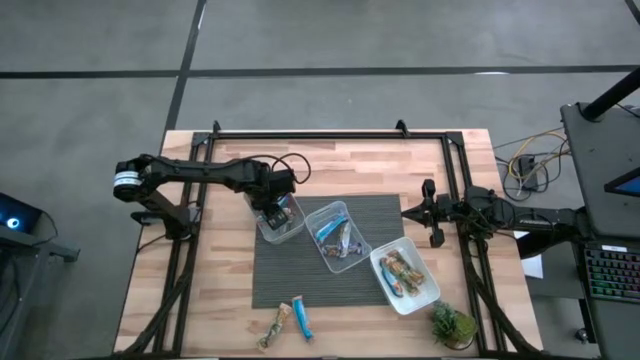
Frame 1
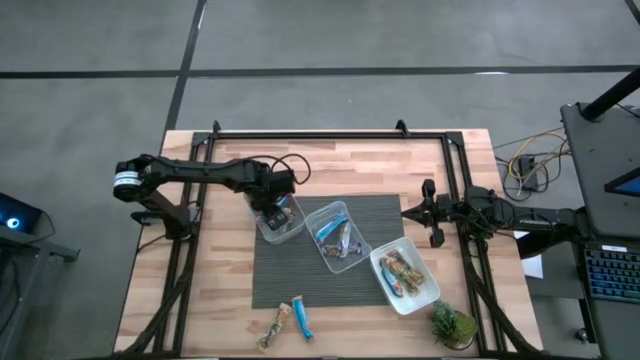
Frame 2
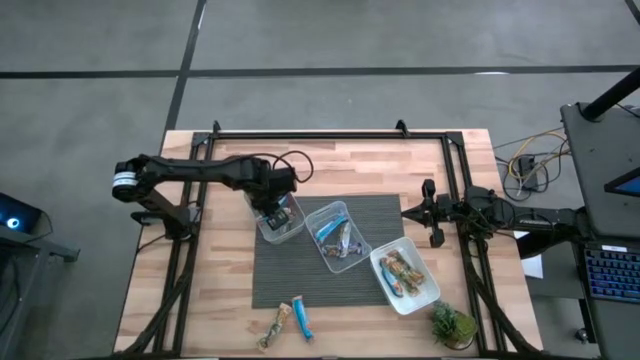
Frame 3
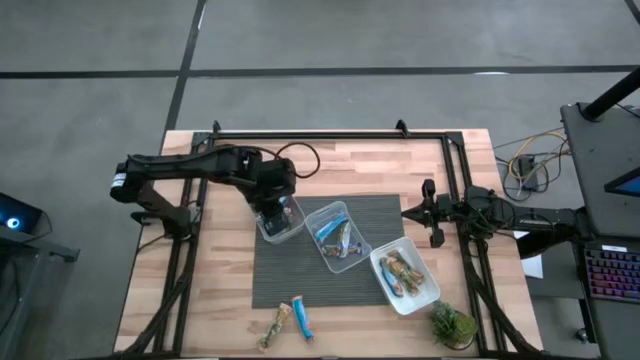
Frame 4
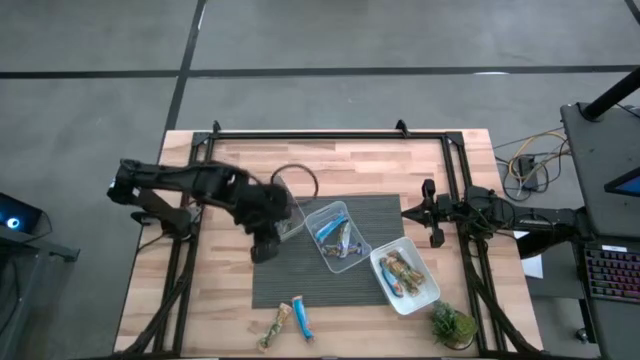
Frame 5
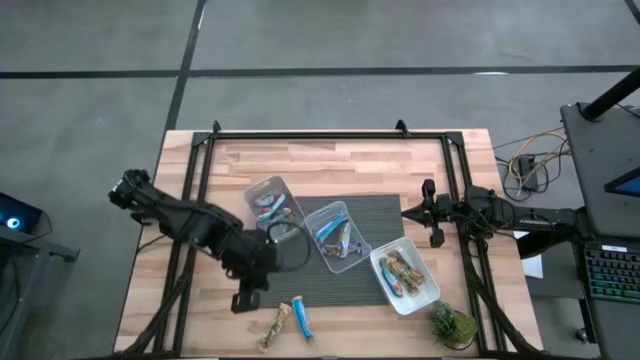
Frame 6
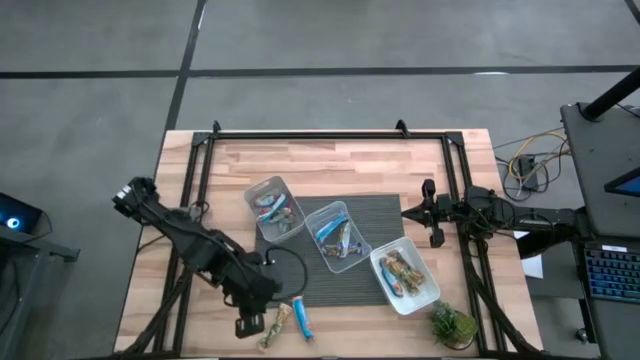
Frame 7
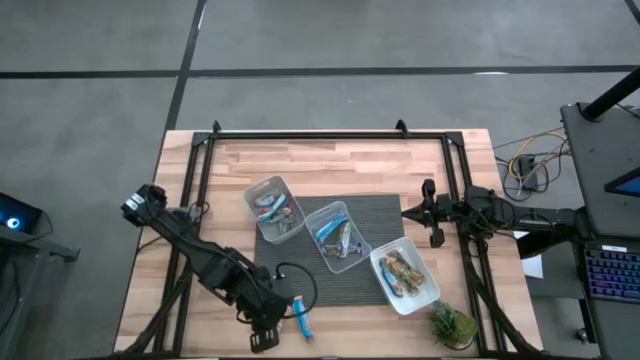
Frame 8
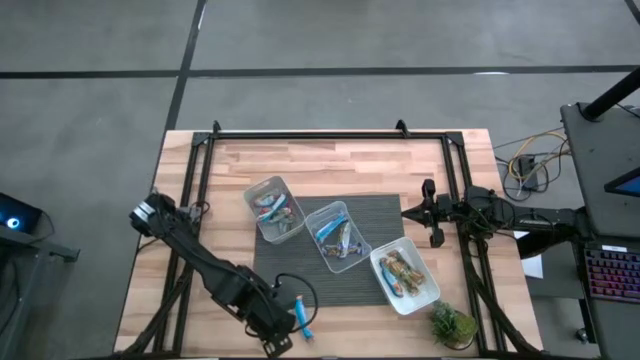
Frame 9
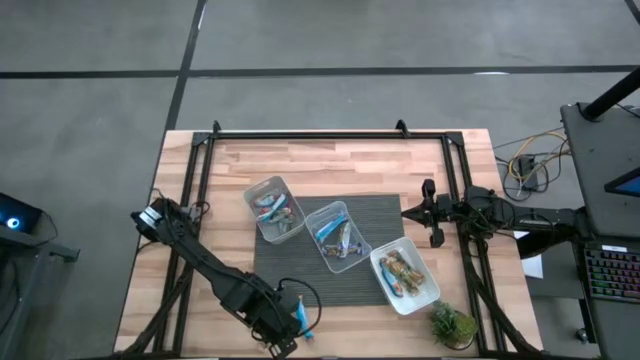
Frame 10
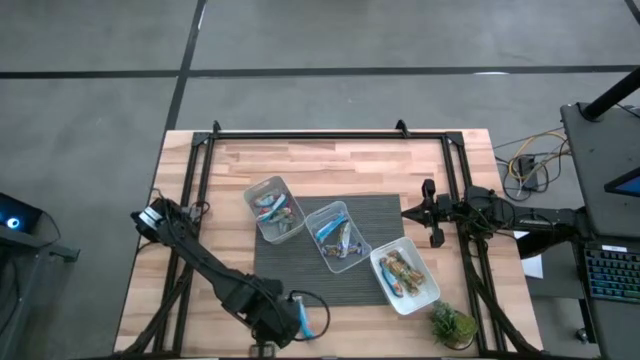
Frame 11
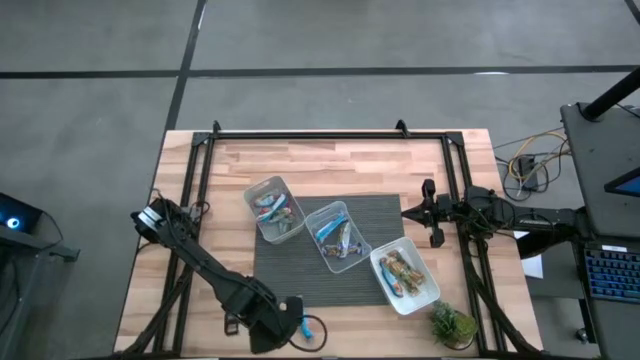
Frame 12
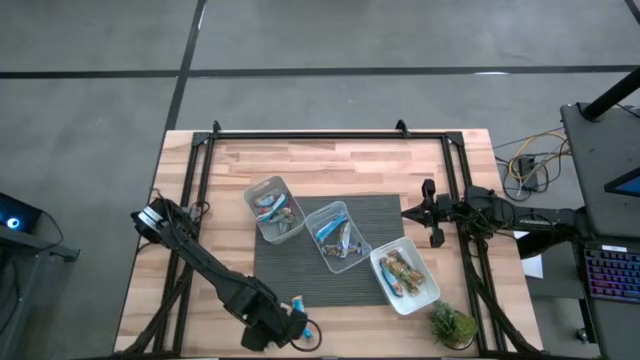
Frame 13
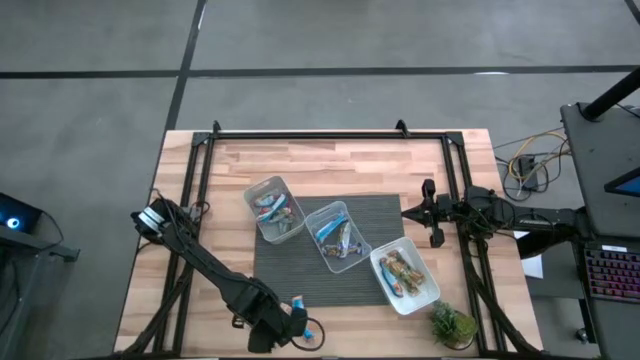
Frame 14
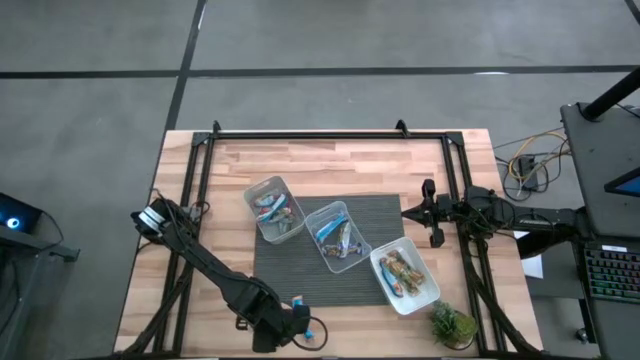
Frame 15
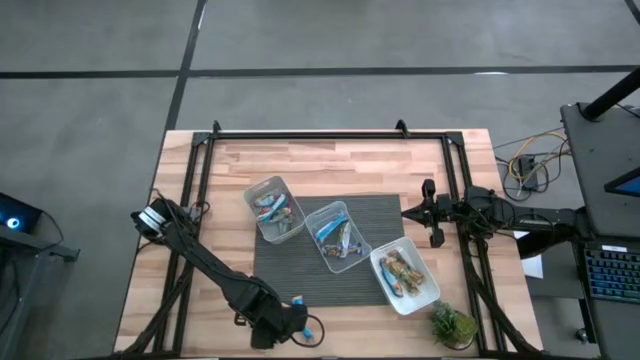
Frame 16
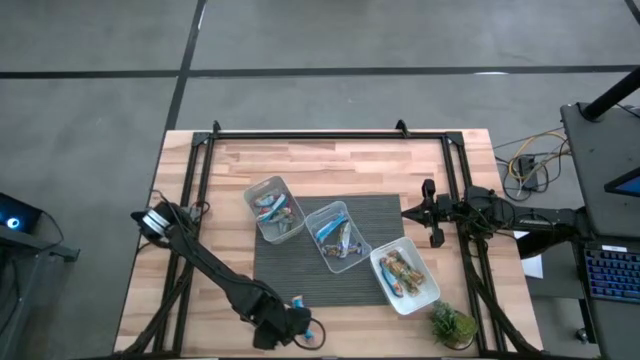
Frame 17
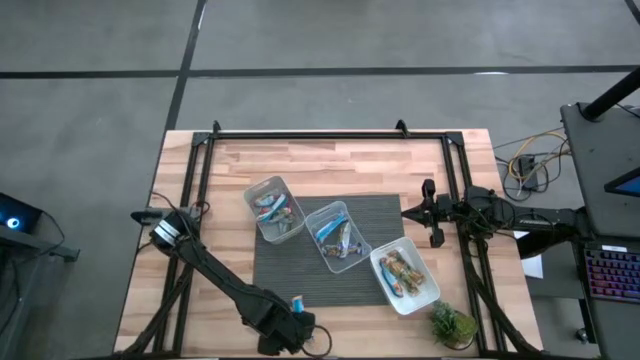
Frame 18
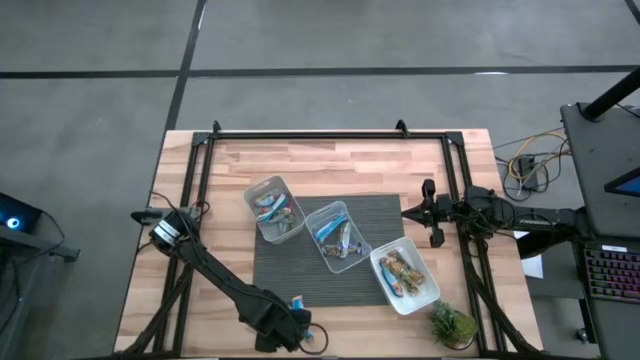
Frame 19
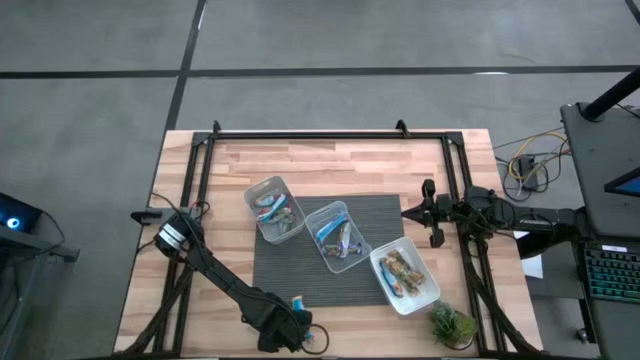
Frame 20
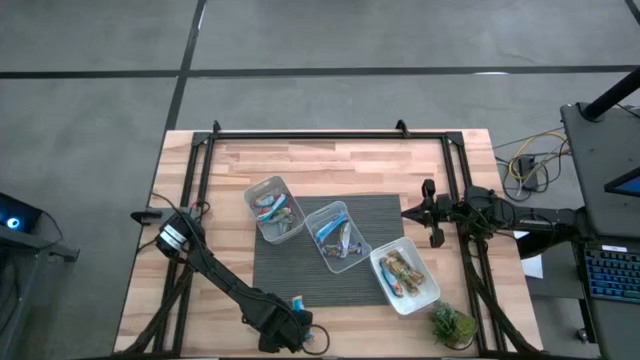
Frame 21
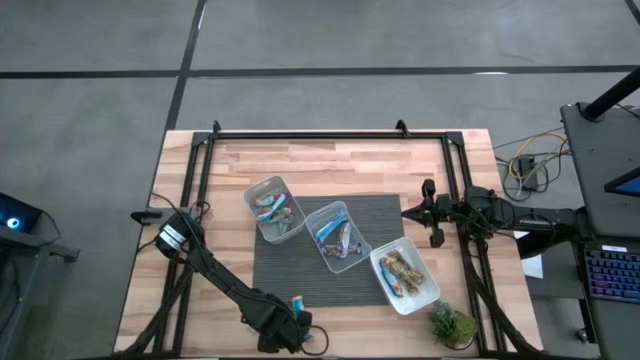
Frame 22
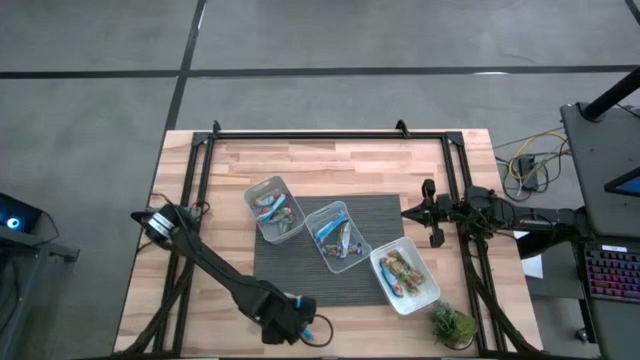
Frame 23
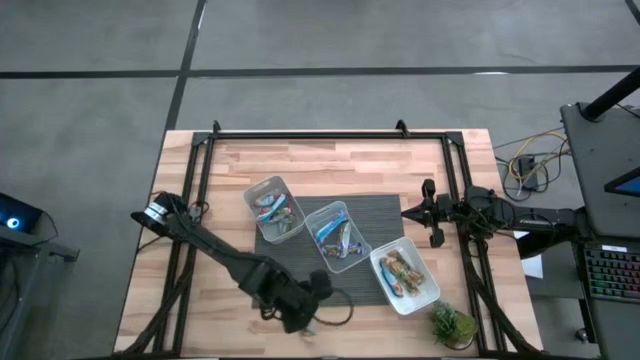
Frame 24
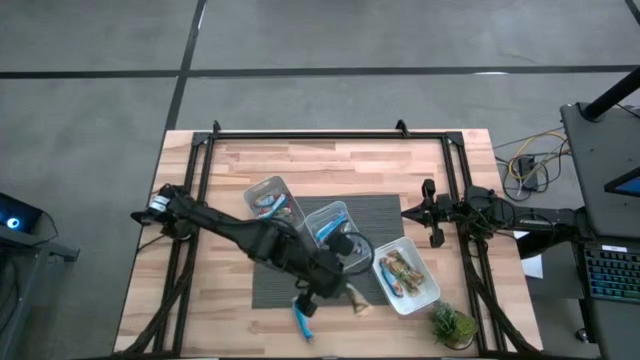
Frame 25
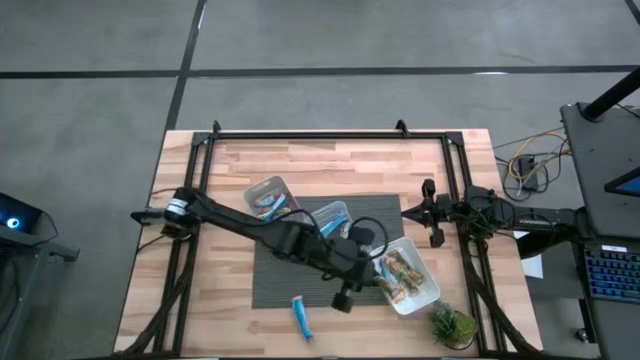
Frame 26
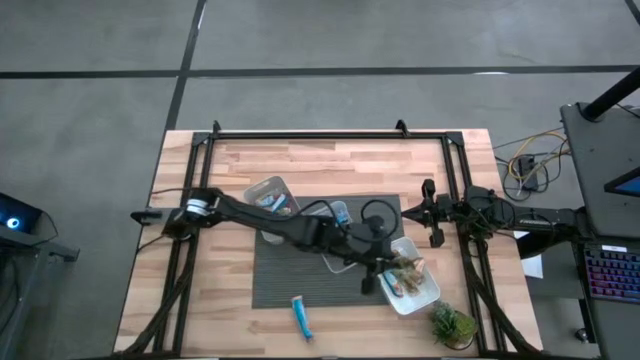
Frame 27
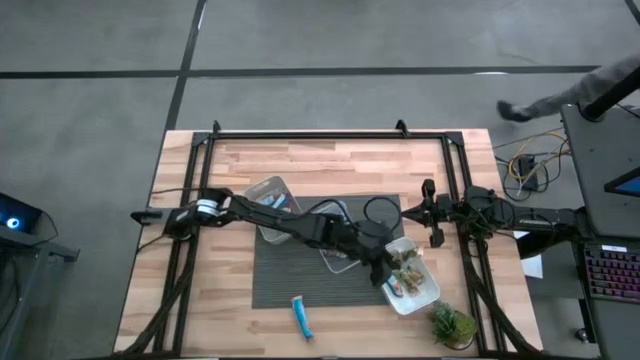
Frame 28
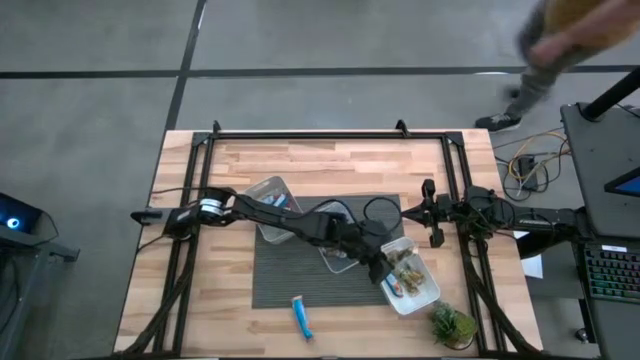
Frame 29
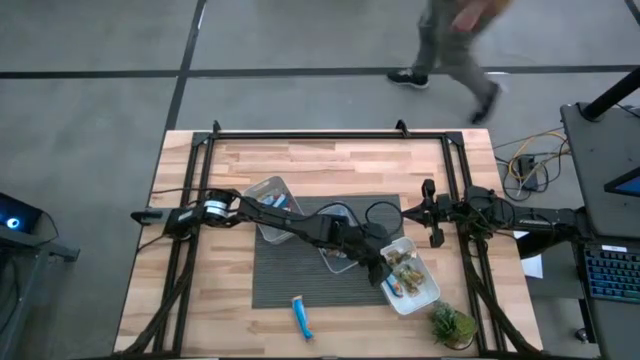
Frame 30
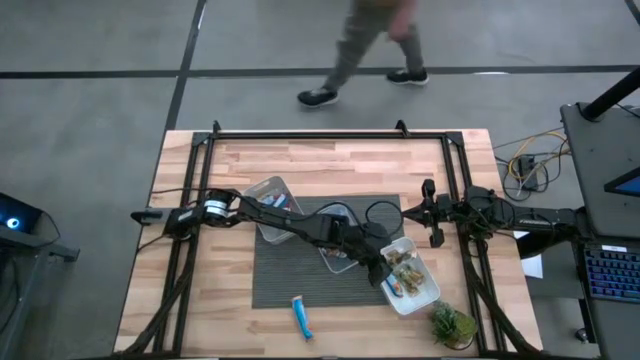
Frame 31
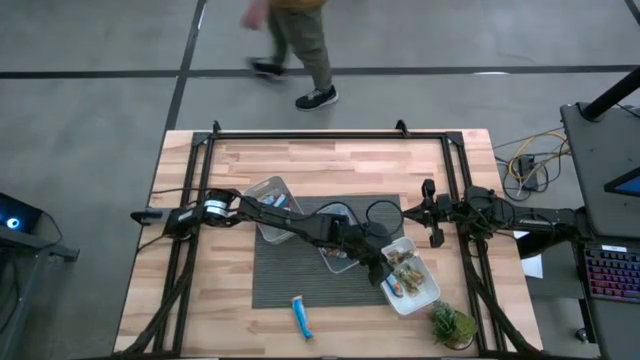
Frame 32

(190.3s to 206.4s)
Task: Pick and place Granola Bars by type
Put the yellow granola bar into the white bin

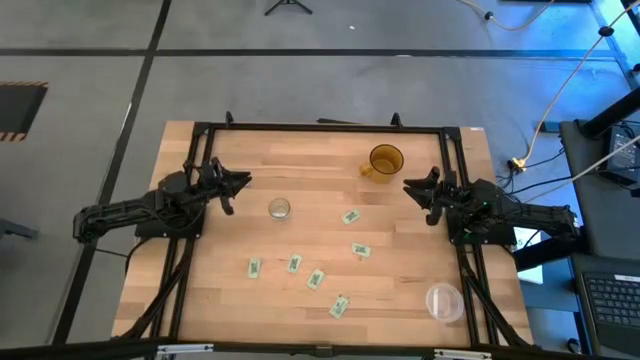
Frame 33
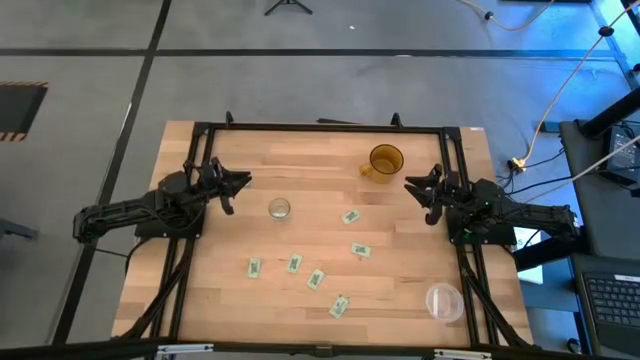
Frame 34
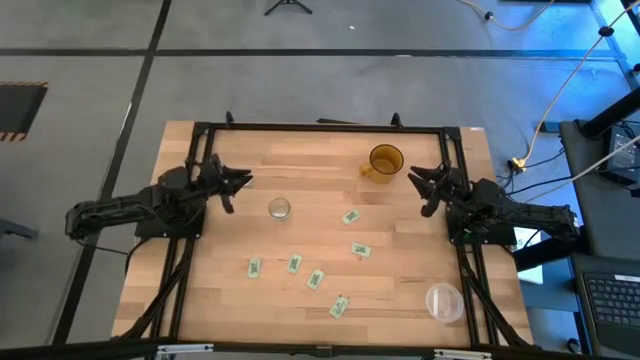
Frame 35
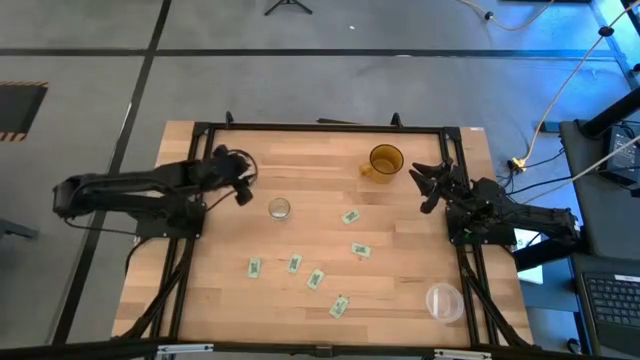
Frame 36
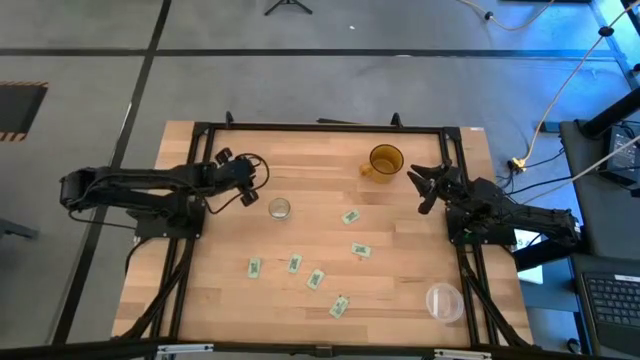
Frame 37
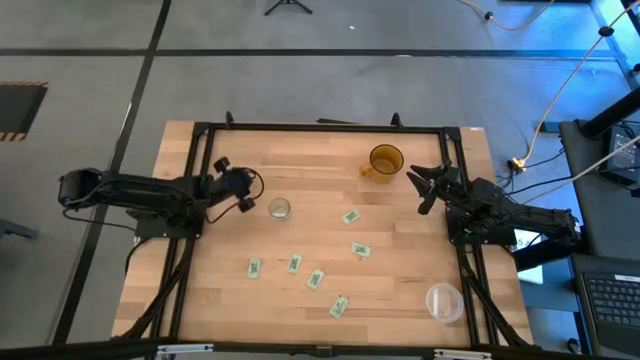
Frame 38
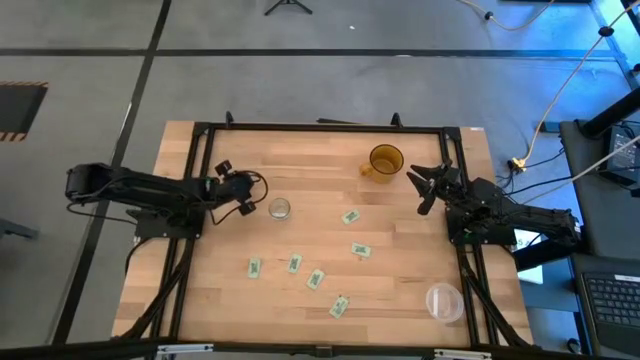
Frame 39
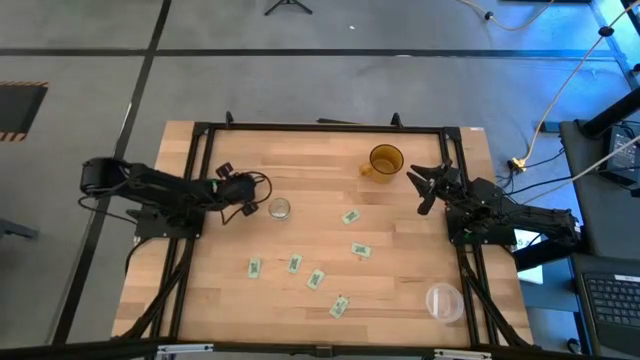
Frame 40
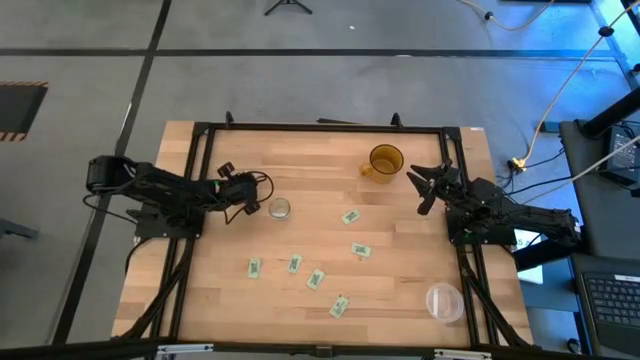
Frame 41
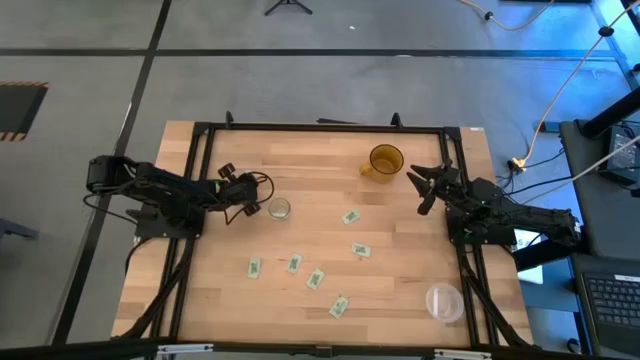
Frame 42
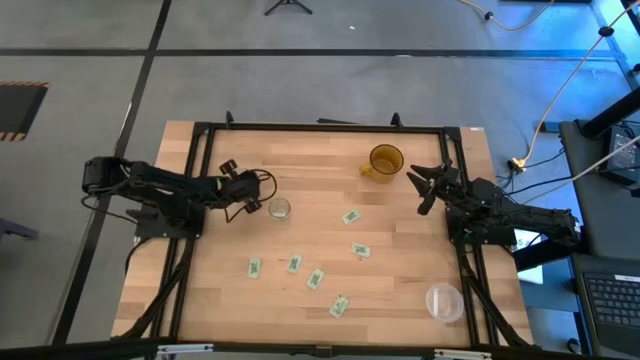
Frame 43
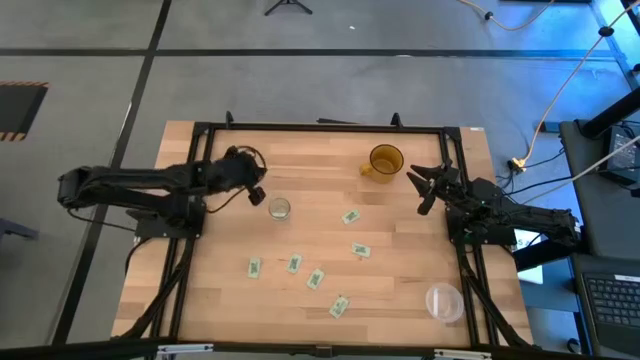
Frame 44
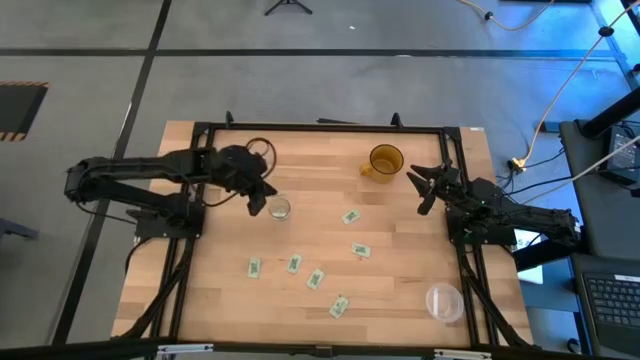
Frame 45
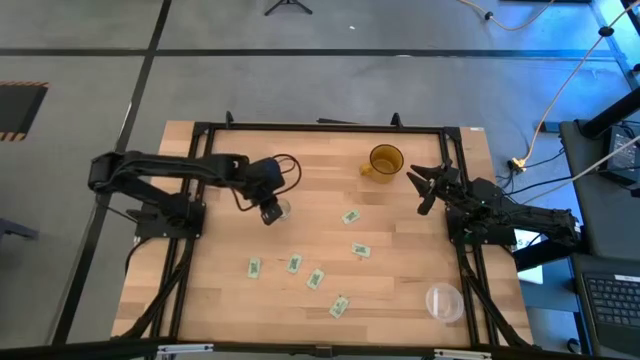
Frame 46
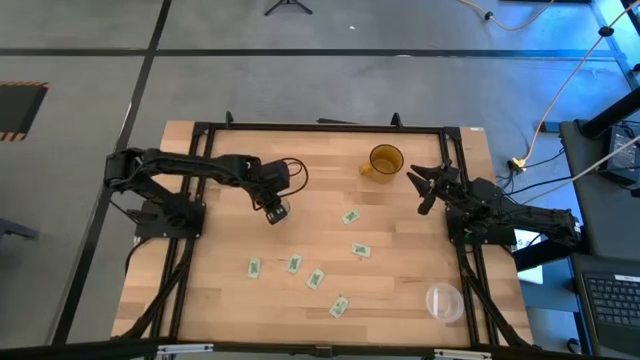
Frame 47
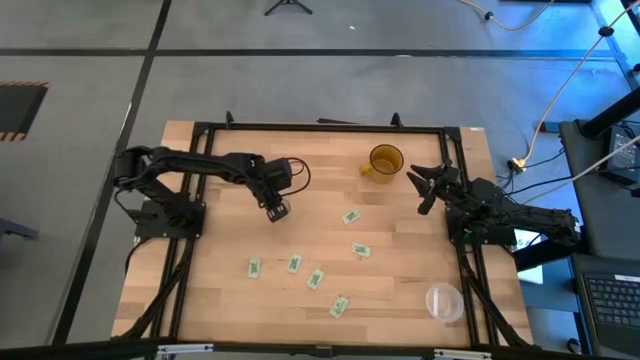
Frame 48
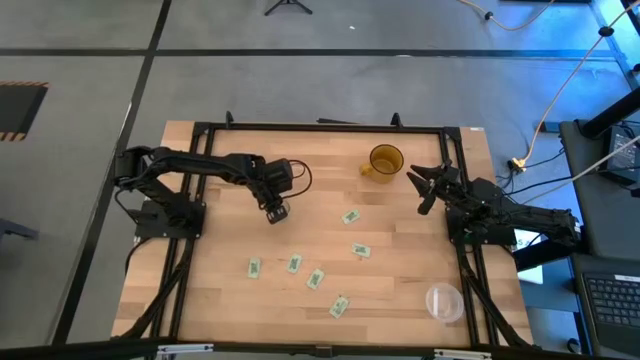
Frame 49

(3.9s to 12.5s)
Task: Pick and place Stevia / Truvia into bins
Put the stevia packet into the transparent container
